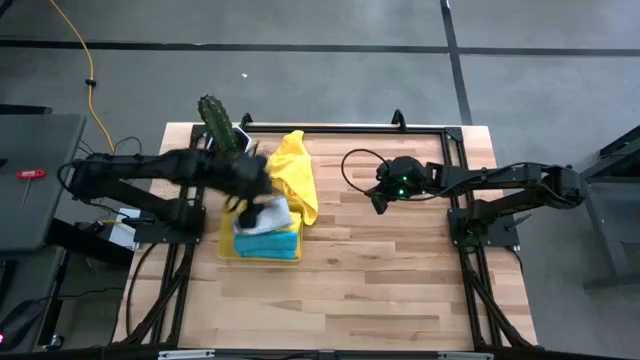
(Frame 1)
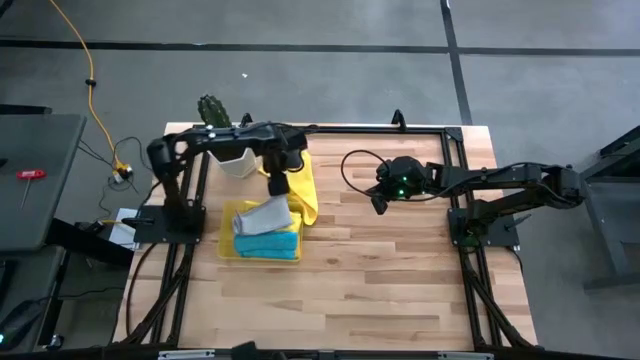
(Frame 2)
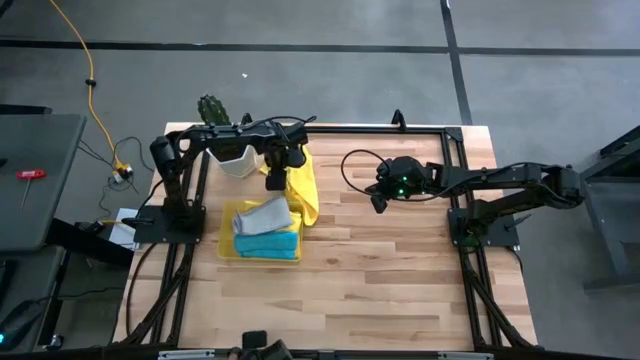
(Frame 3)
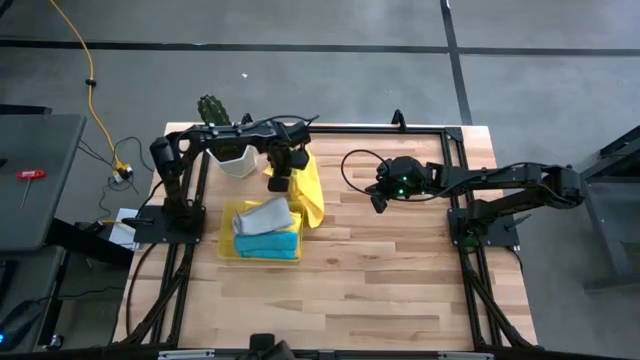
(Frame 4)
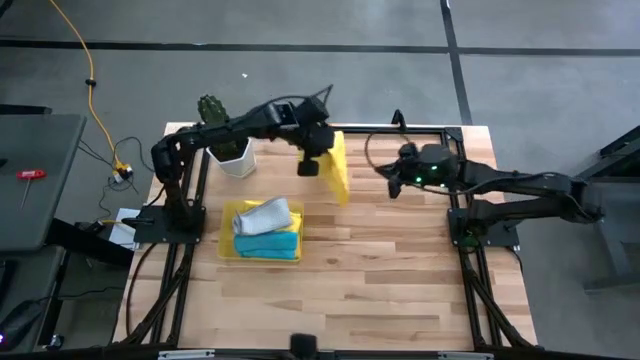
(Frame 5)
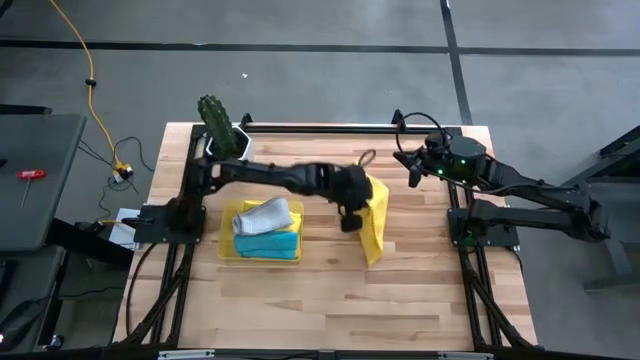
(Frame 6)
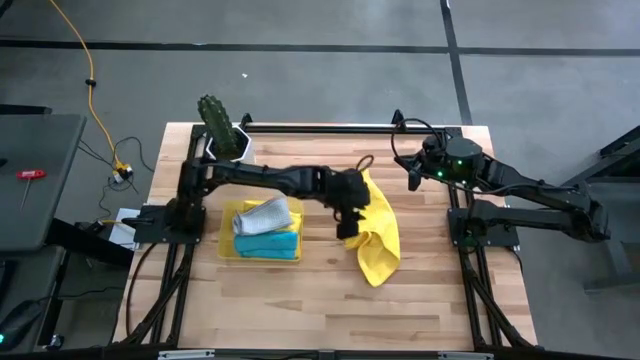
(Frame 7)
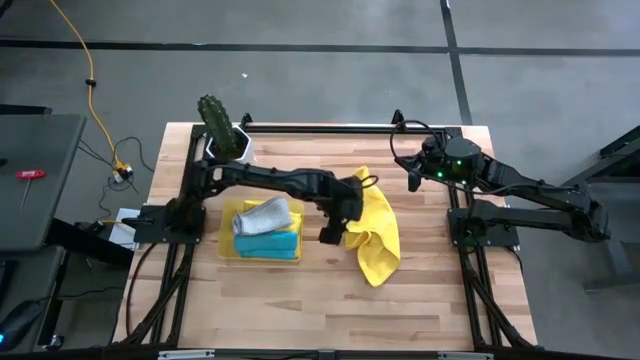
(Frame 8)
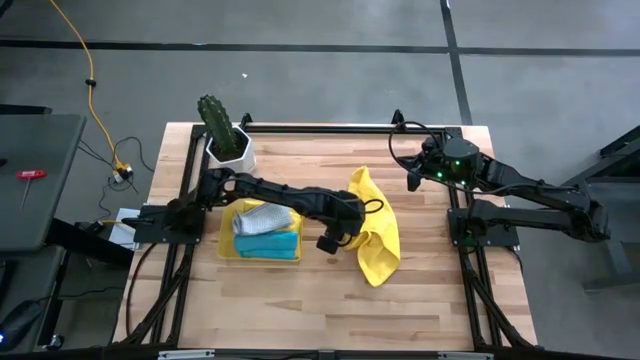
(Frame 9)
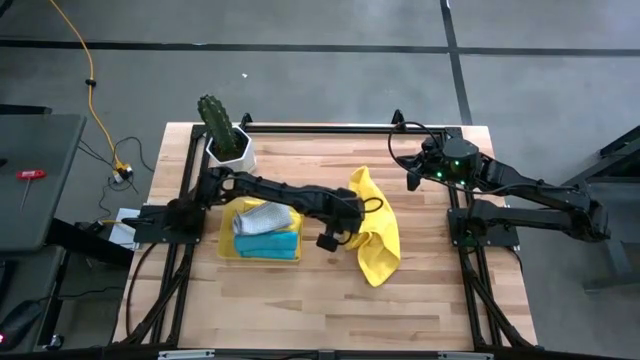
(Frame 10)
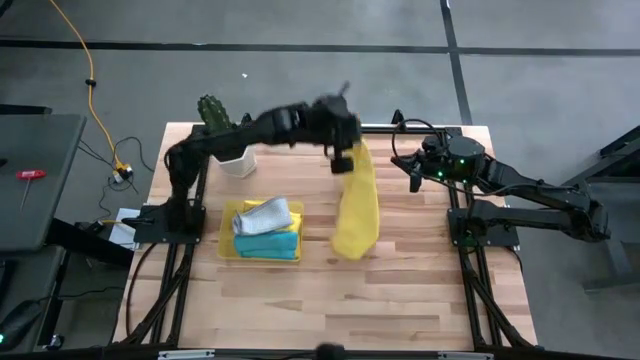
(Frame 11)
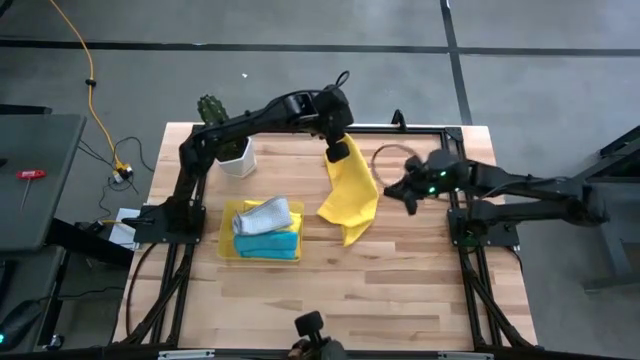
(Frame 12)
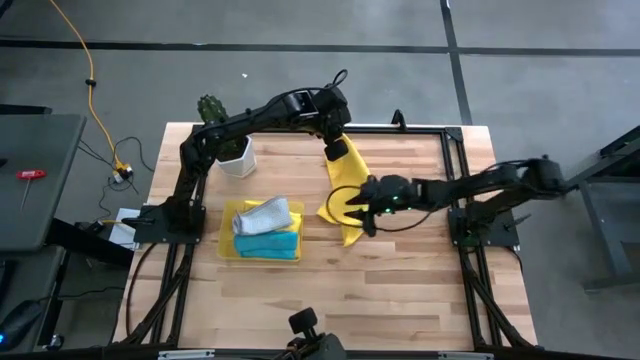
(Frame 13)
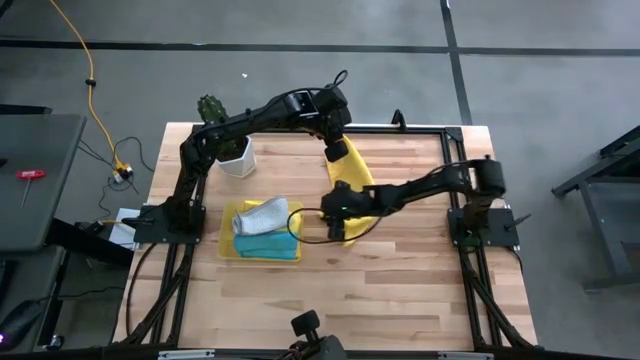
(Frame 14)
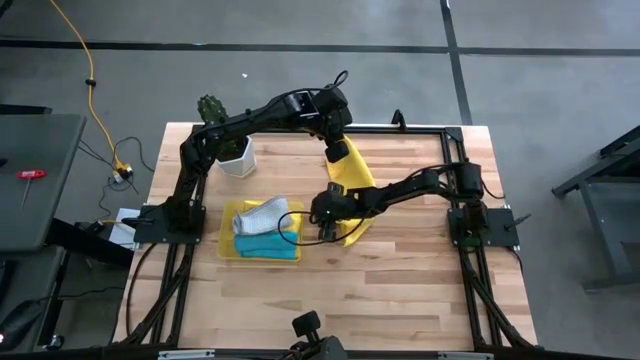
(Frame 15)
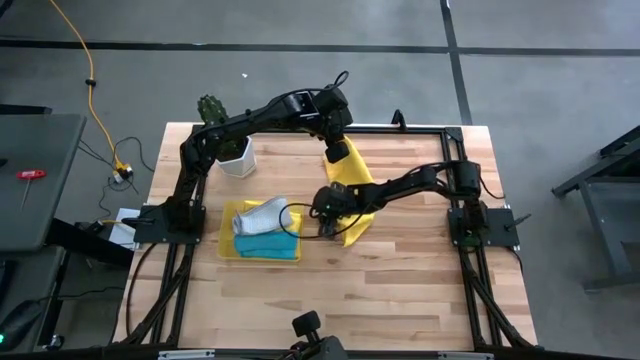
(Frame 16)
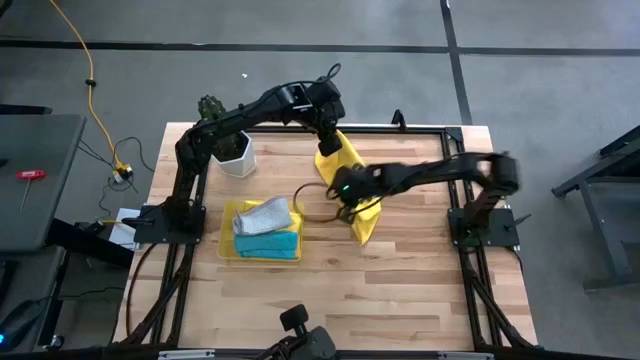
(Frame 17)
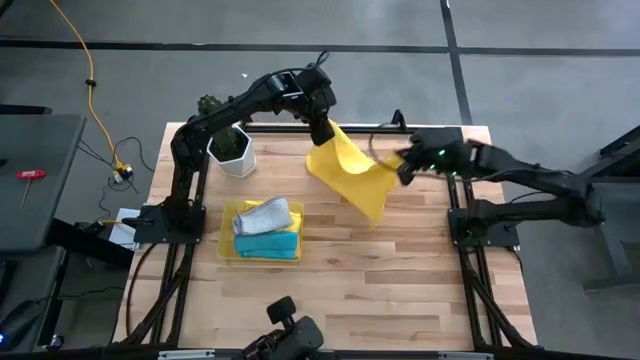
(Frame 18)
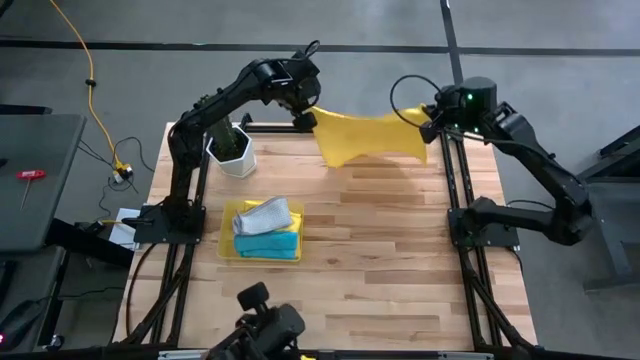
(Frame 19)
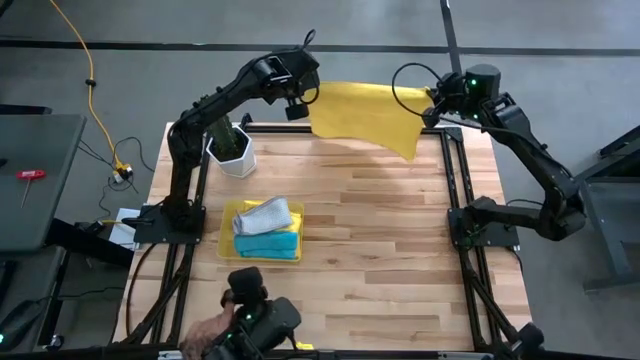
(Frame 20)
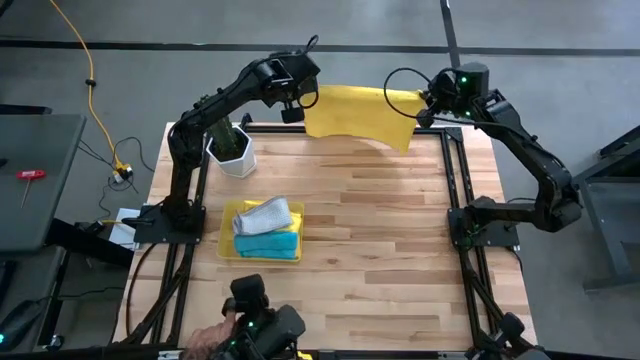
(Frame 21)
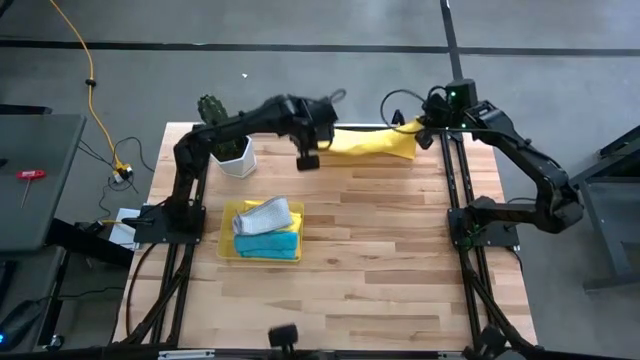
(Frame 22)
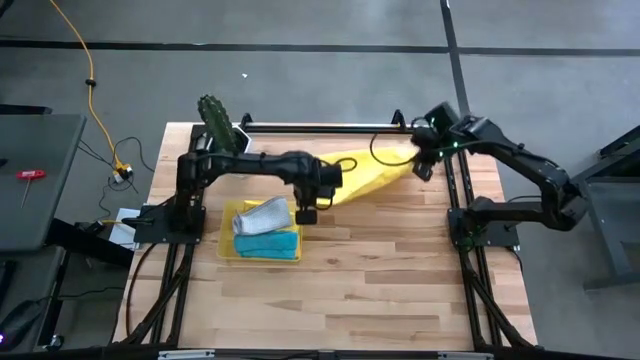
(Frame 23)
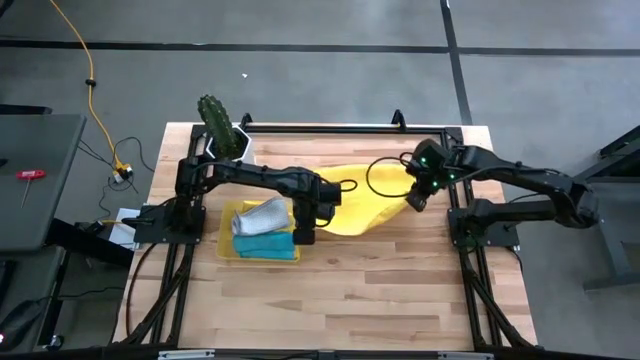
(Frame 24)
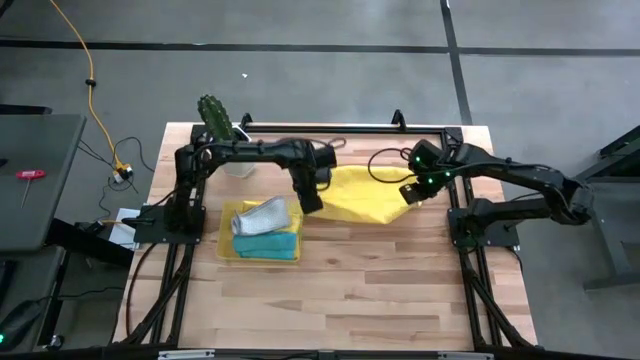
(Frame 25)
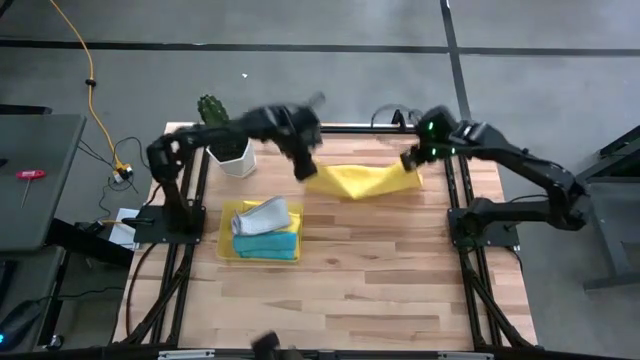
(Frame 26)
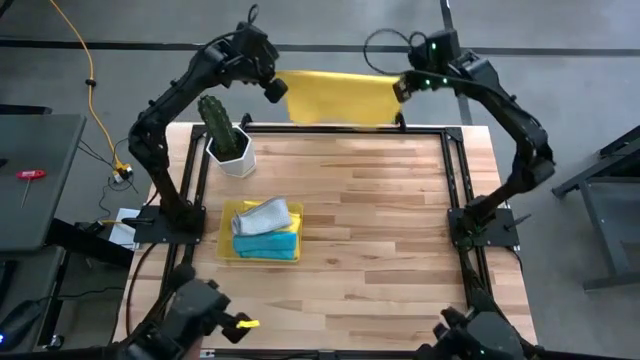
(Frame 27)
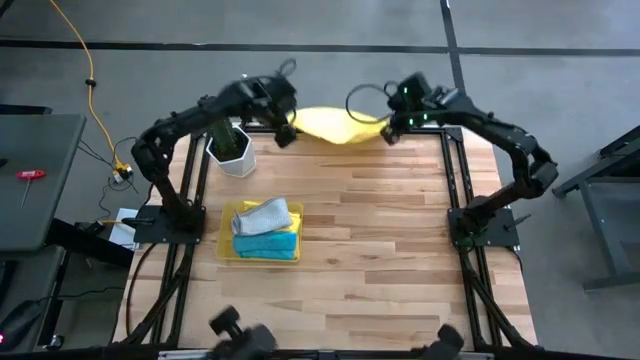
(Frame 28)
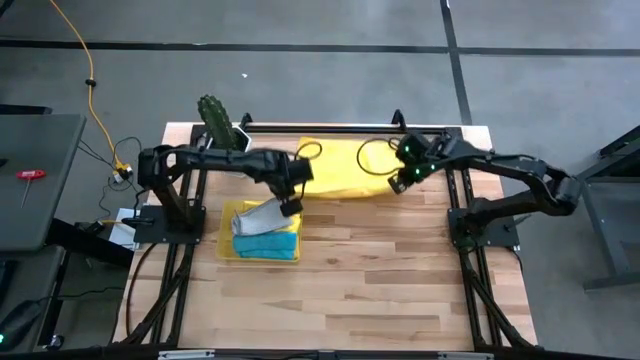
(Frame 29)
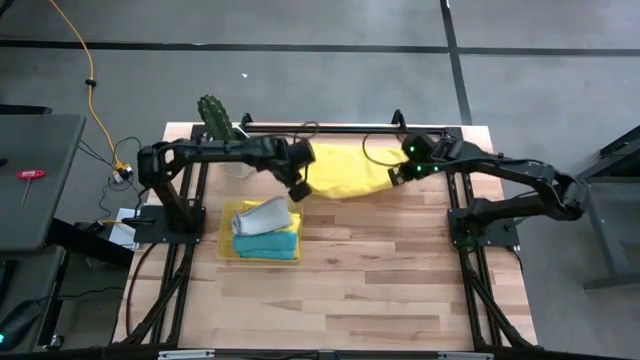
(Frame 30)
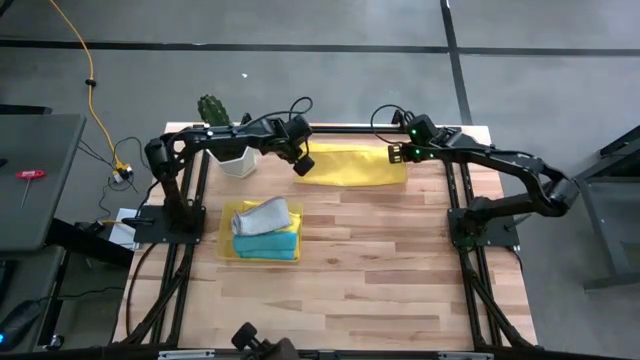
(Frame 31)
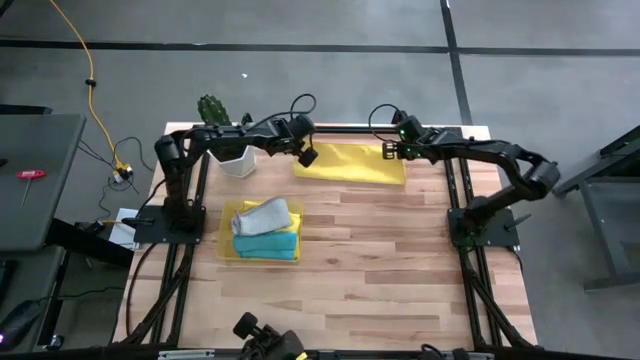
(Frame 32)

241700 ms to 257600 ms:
Task: Fold microfiber towels
Fold the yellow microfiber towel

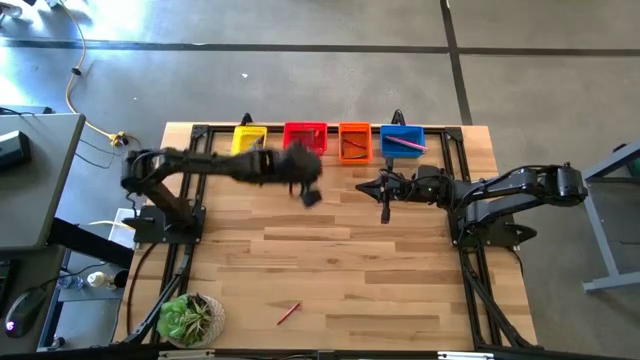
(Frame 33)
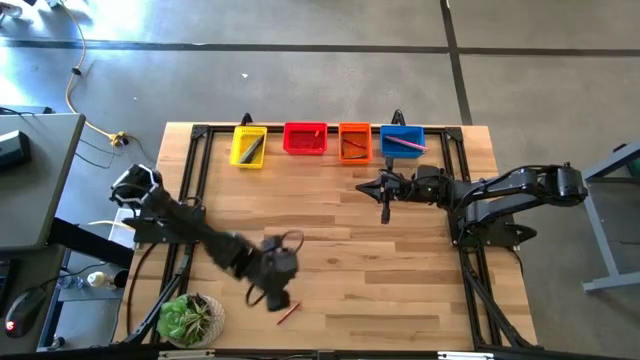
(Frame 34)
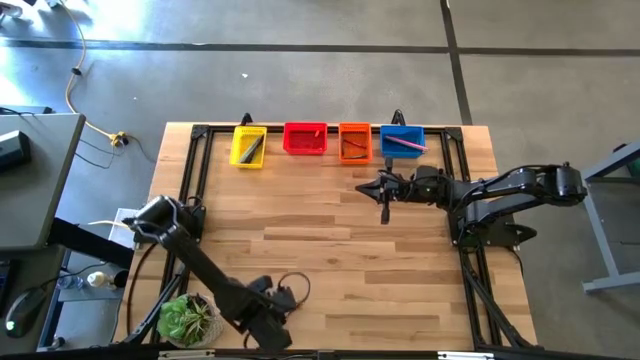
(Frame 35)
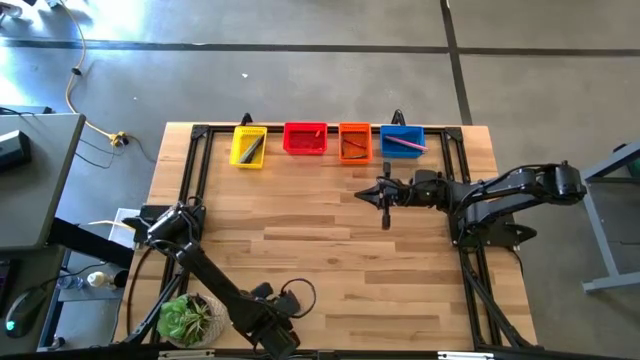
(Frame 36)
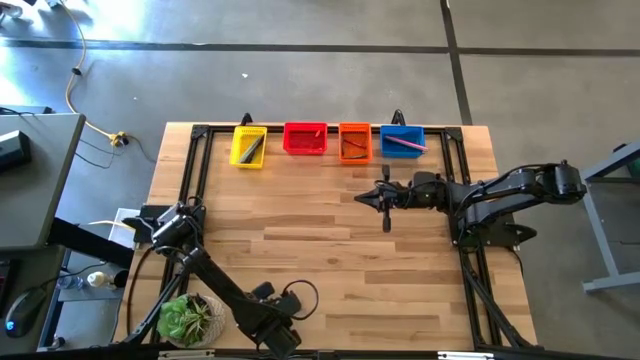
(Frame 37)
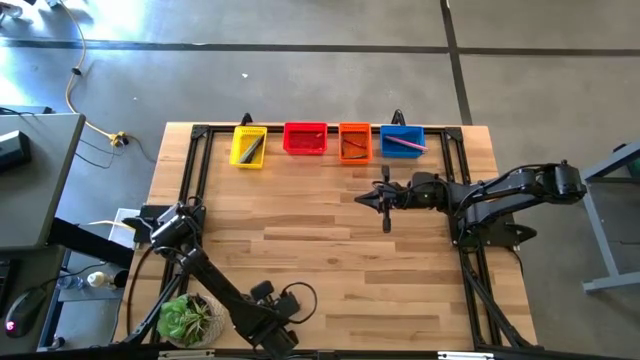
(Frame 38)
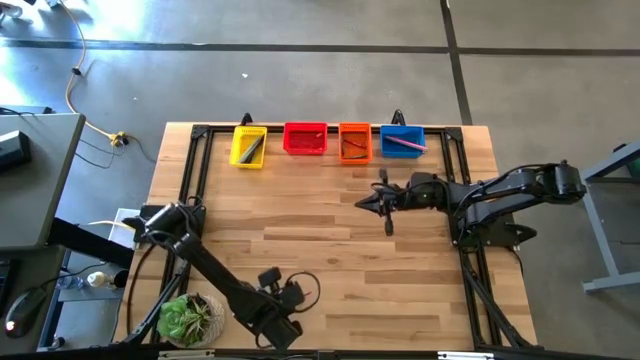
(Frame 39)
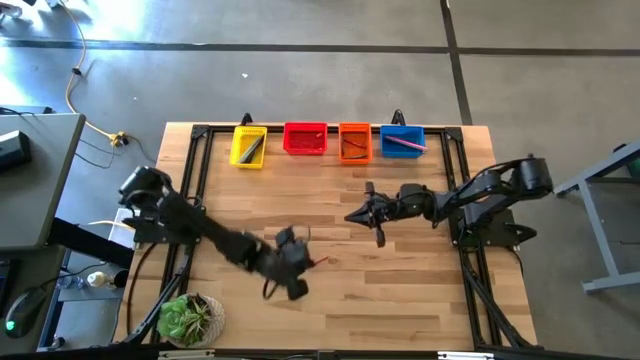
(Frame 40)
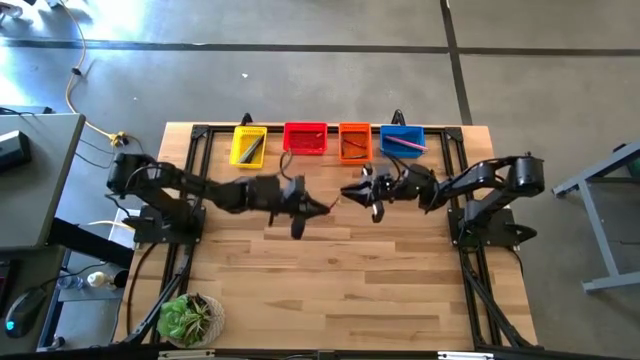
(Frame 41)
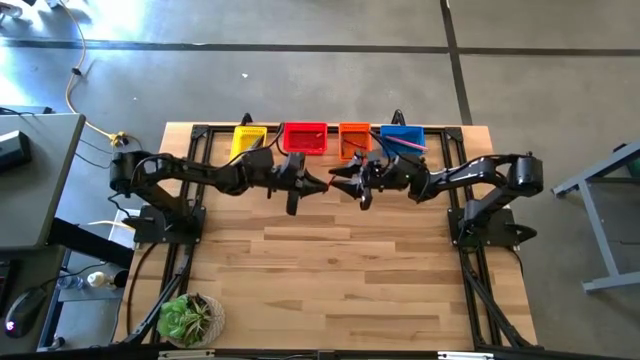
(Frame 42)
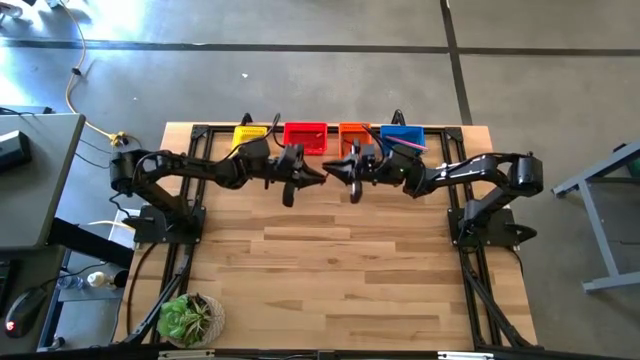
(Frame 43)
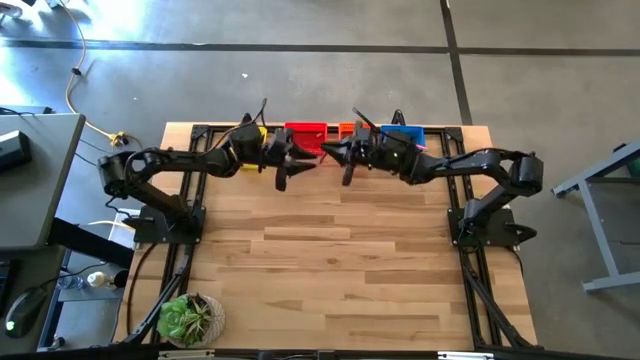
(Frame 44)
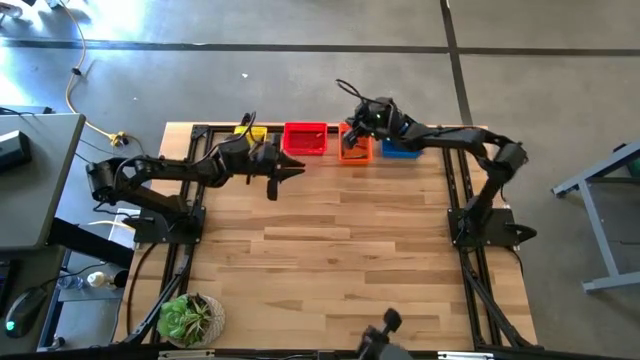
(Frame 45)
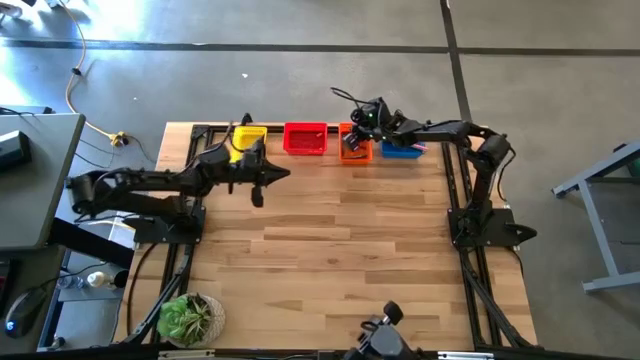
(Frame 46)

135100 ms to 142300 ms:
Task: Sort crayons/erasers/pens/pencils in bins
Put the red crayon into the orange basket
